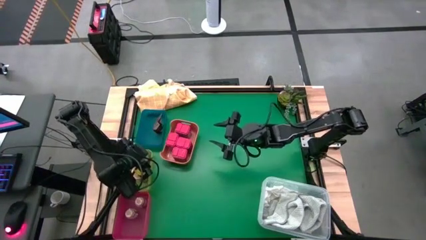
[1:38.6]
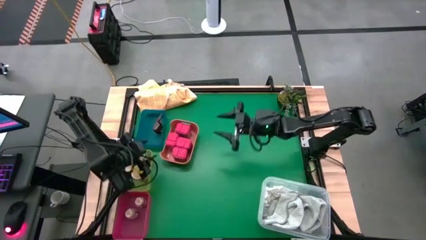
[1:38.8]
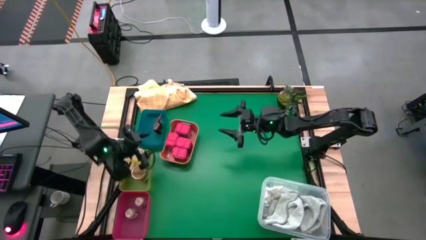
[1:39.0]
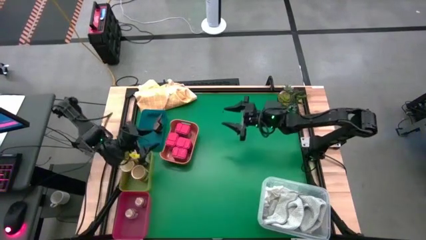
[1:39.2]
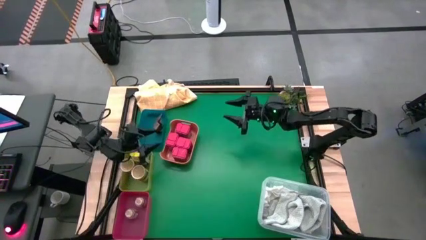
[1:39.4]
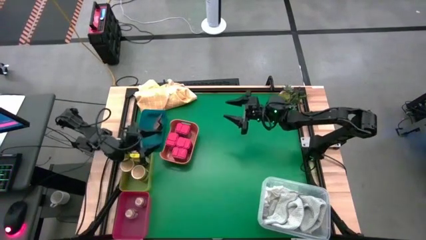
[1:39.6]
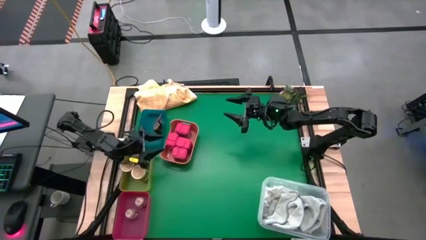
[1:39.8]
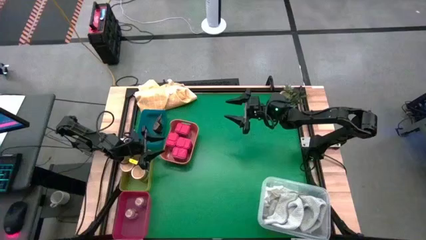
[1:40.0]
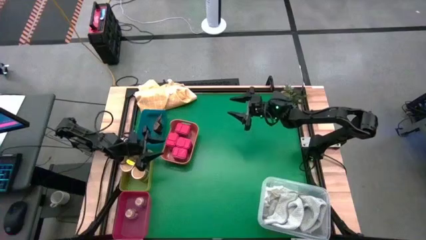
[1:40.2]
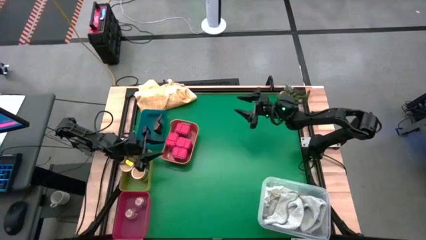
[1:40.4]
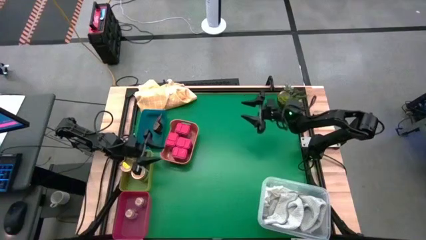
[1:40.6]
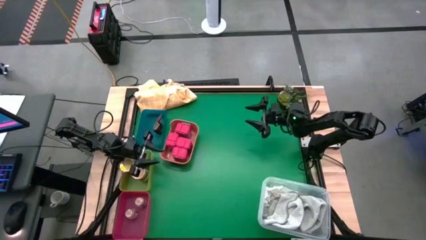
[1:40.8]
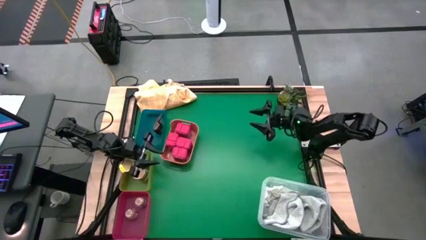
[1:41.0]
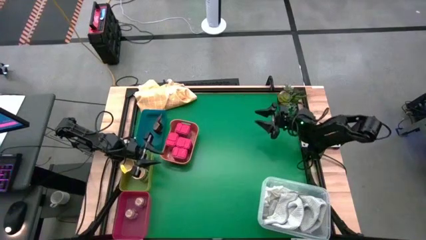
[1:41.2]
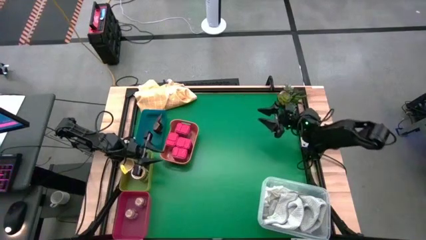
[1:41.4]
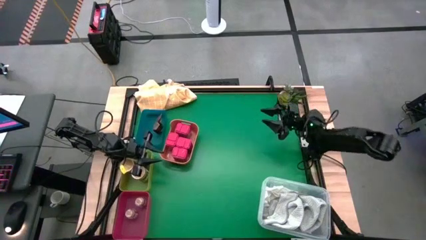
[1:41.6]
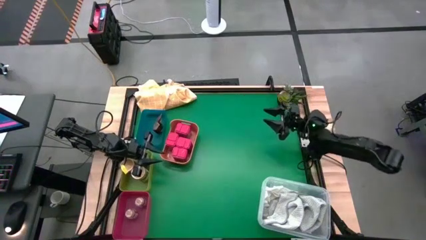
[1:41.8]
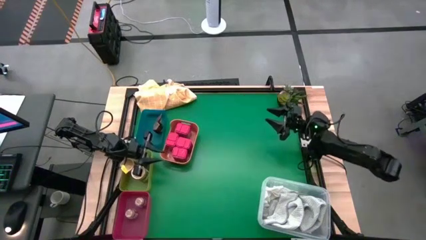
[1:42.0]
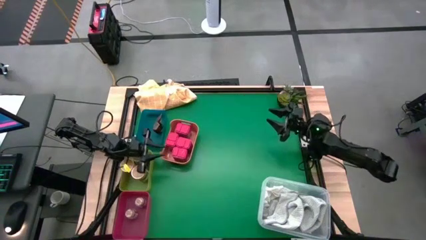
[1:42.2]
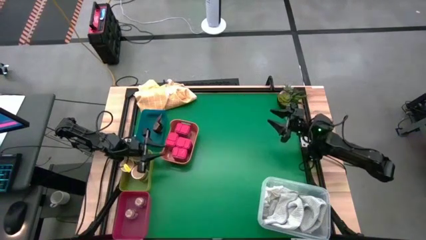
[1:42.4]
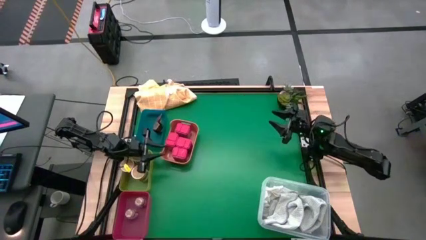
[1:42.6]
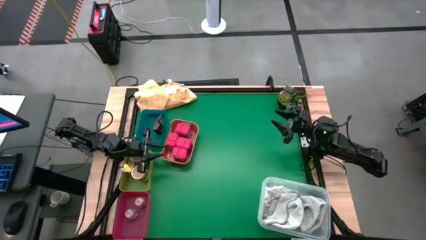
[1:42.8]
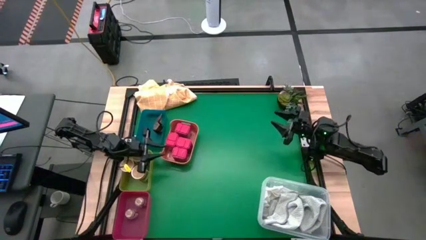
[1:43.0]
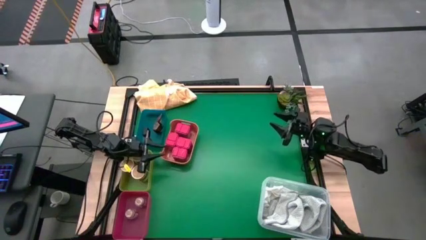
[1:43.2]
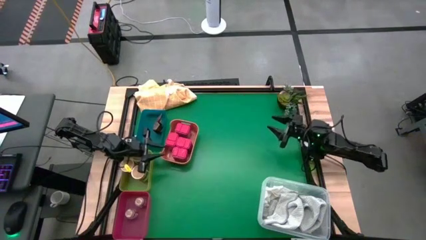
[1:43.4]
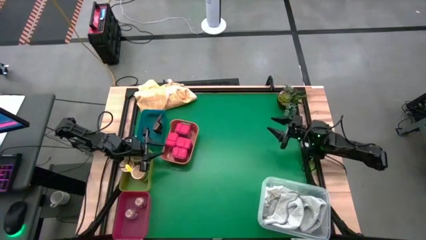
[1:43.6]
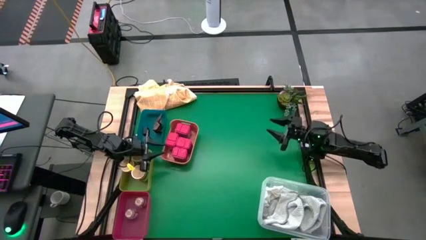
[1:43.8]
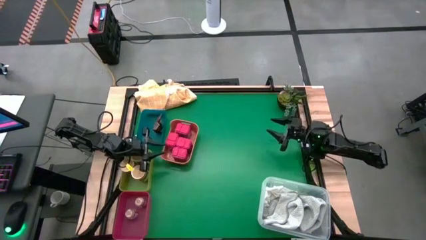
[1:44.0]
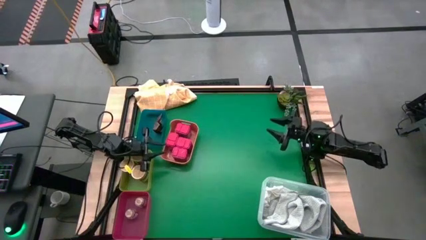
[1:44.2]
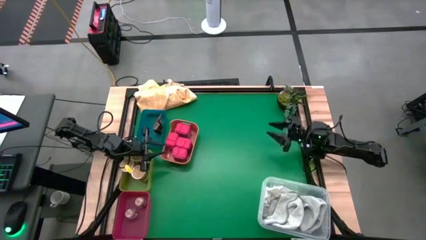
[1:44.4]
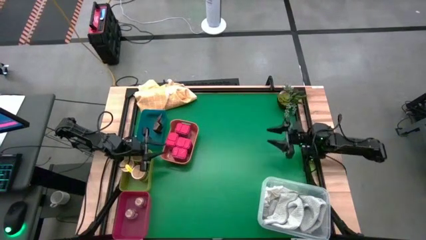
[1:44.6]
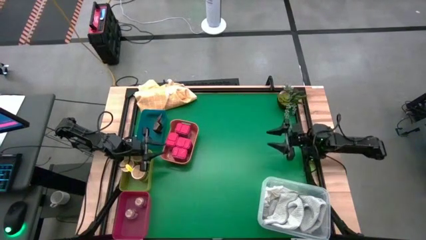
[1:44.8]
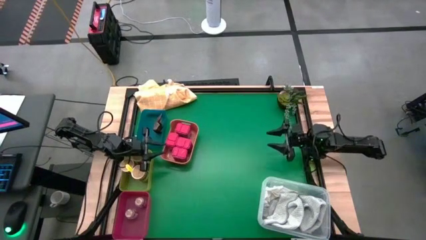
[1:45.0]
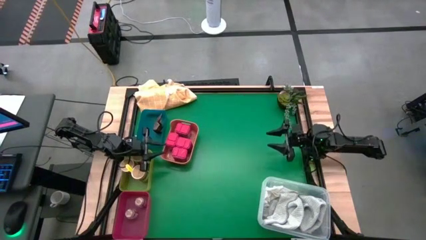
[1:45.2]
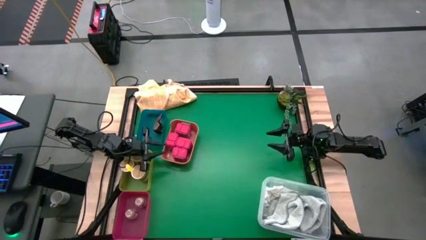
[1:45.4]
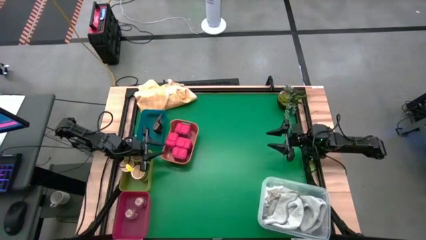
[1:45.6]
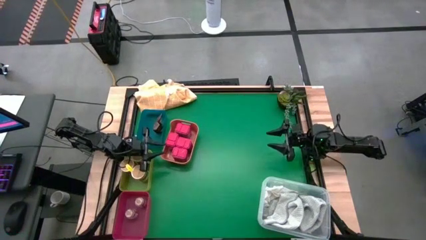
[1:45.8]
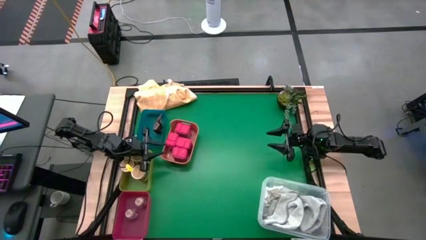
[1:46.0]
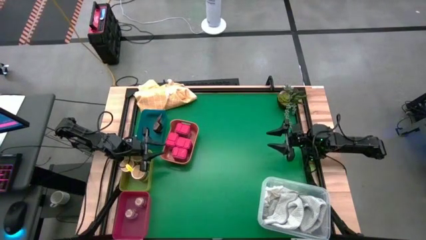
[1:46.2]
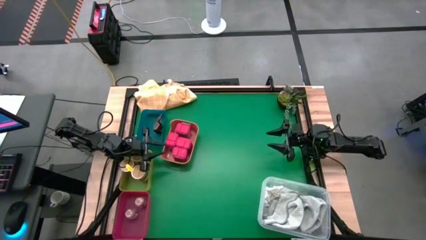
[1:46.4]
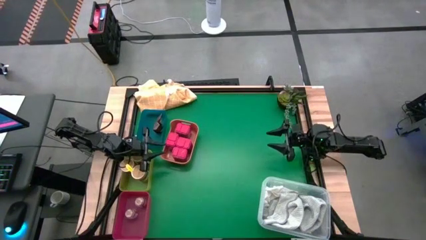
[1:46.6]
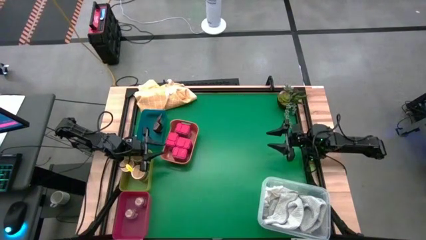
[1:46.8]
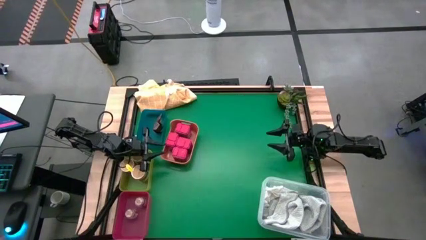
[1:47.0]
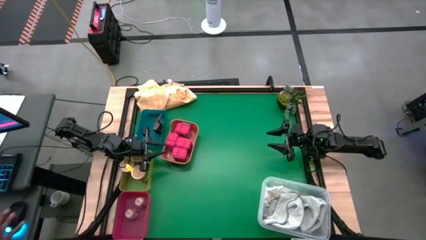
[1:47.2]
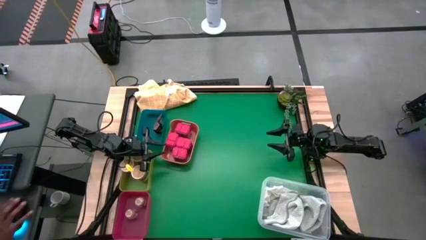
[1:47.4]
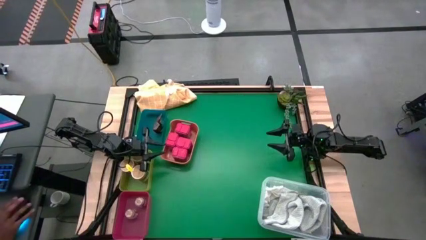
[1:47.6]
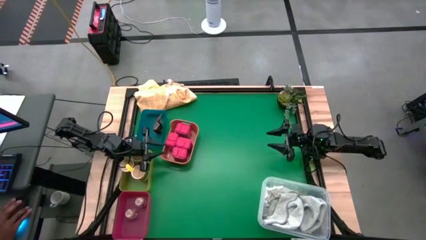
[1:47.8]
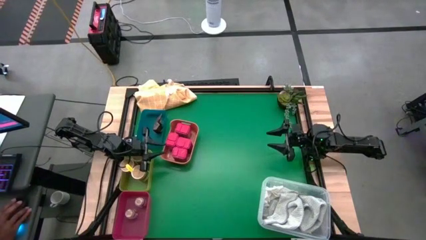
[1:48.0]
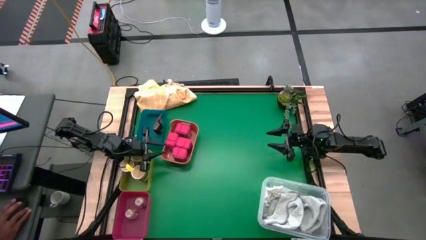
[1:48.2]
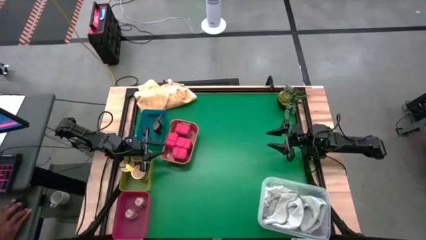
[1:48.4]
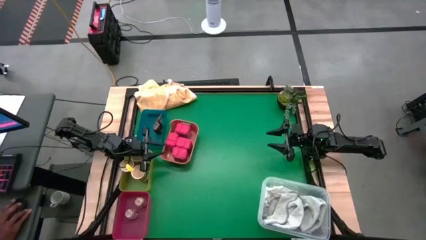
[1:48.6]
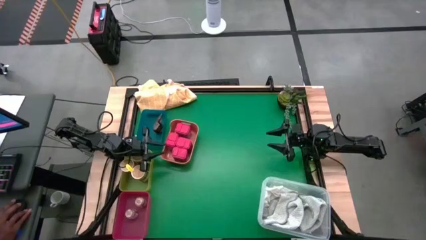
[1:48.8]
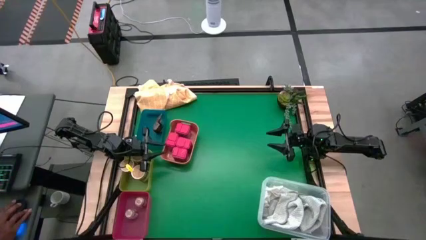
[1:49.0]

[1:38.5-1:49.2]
Task: Sort spices by type
Return to Home Position
